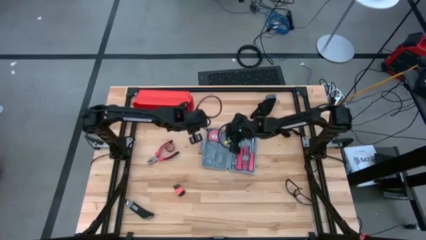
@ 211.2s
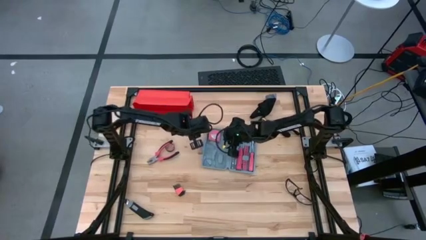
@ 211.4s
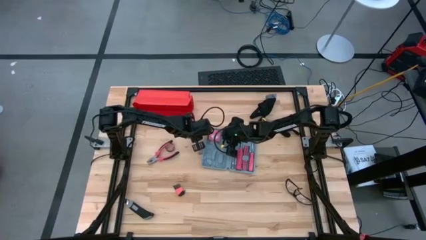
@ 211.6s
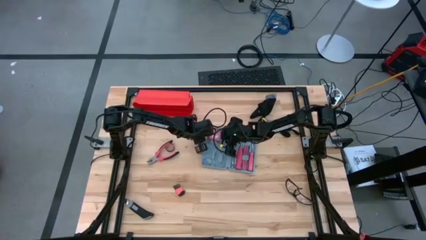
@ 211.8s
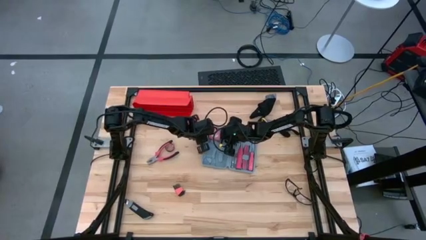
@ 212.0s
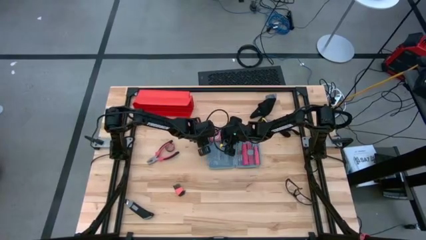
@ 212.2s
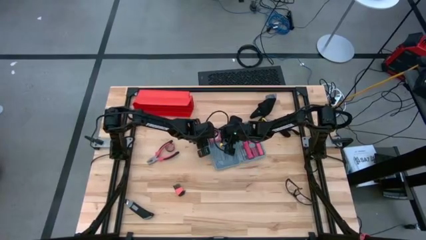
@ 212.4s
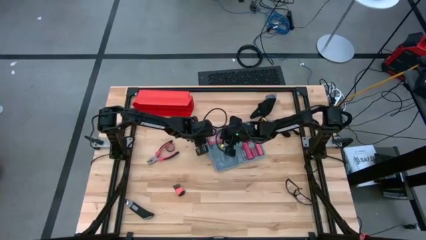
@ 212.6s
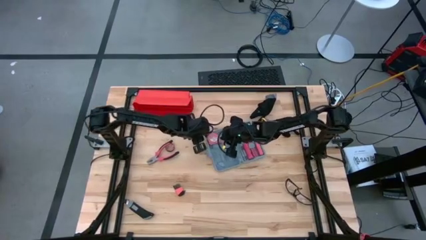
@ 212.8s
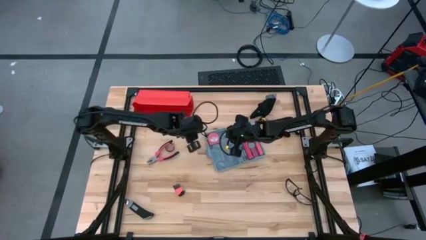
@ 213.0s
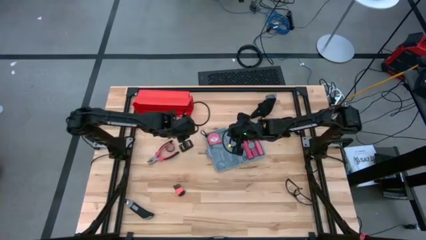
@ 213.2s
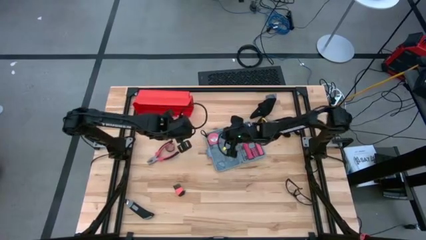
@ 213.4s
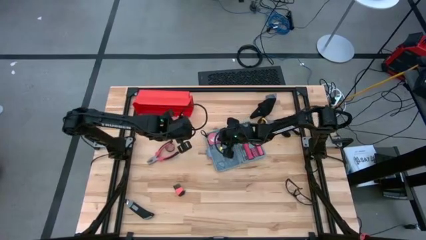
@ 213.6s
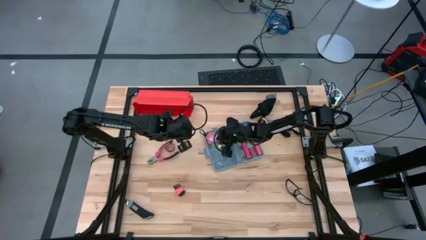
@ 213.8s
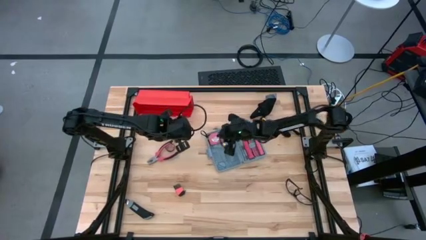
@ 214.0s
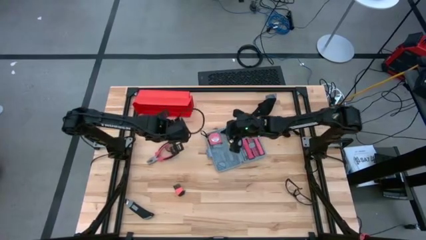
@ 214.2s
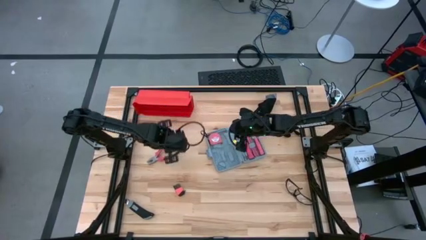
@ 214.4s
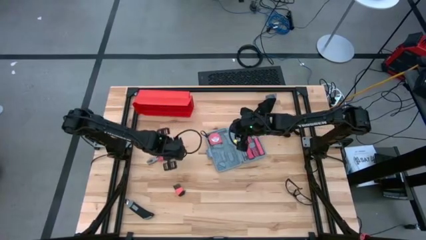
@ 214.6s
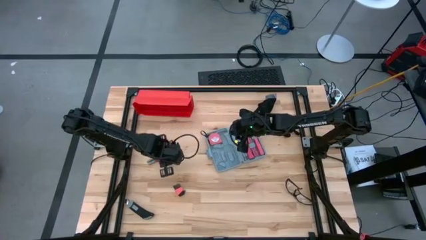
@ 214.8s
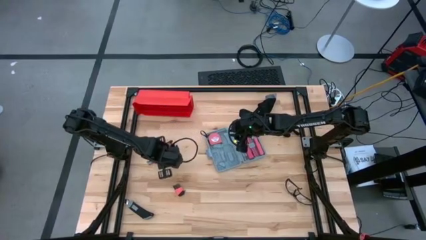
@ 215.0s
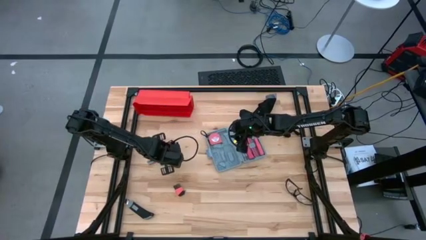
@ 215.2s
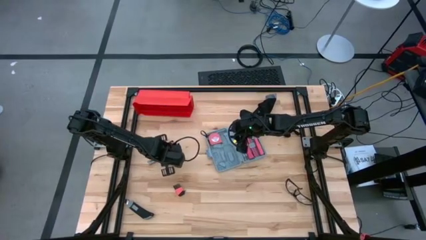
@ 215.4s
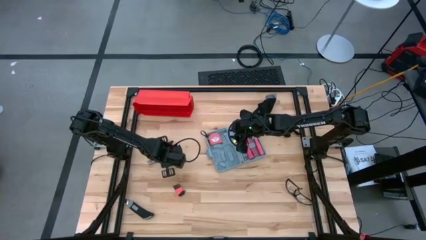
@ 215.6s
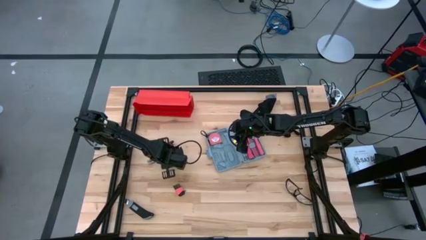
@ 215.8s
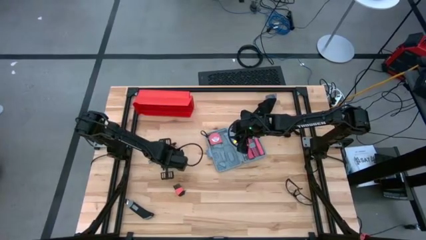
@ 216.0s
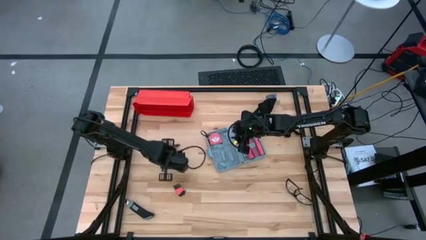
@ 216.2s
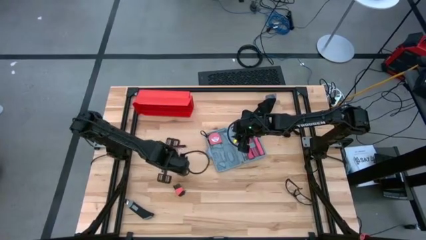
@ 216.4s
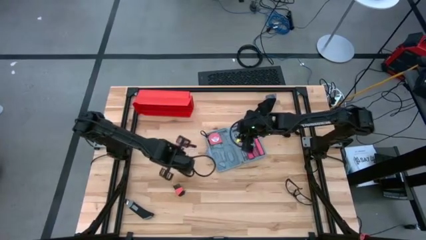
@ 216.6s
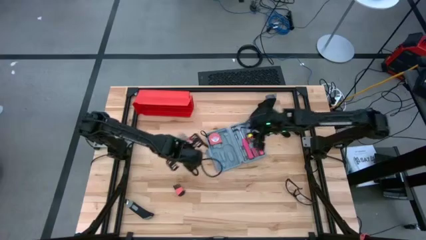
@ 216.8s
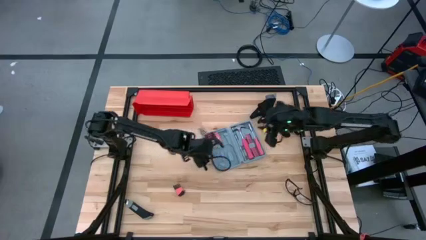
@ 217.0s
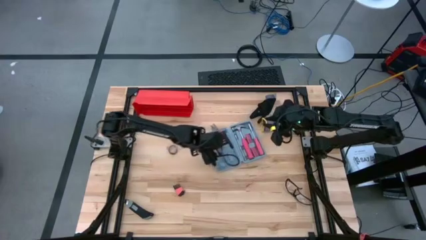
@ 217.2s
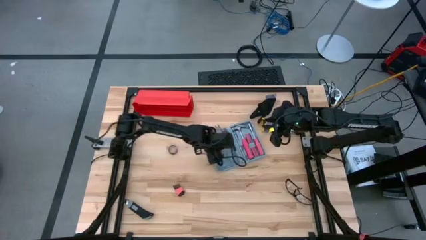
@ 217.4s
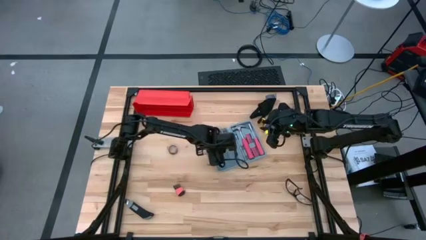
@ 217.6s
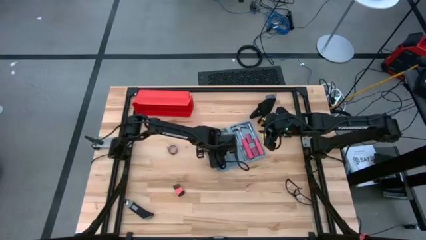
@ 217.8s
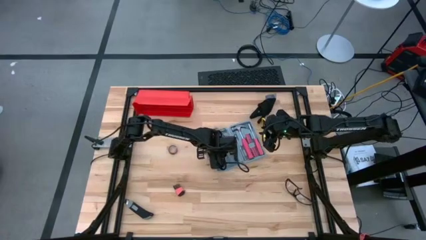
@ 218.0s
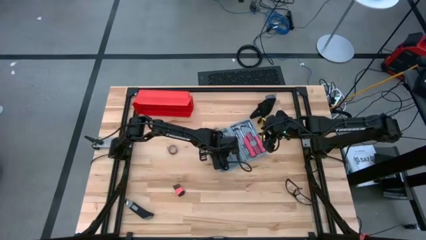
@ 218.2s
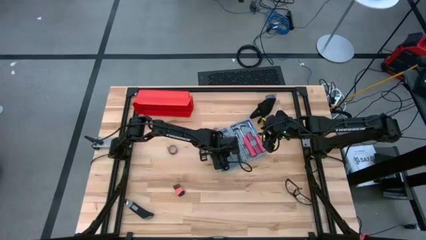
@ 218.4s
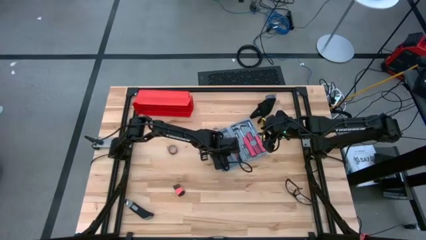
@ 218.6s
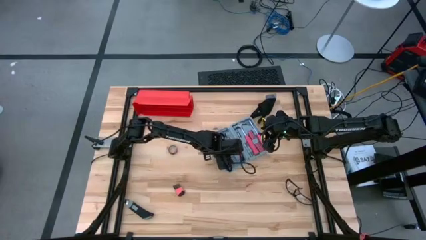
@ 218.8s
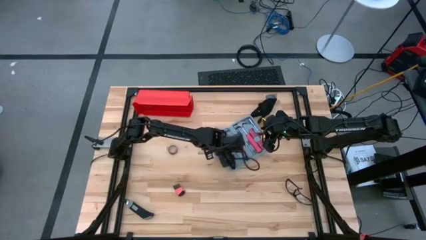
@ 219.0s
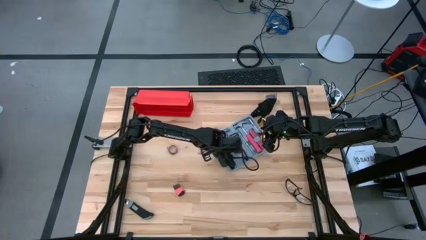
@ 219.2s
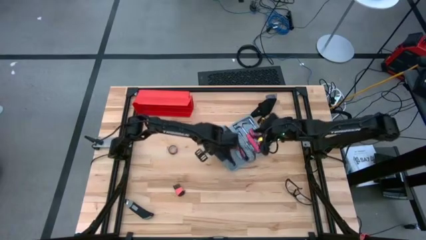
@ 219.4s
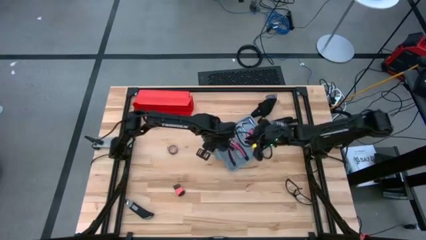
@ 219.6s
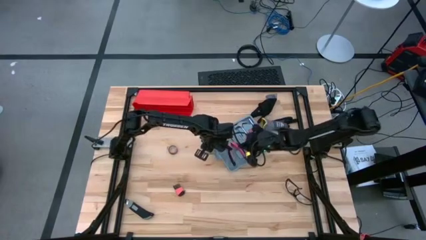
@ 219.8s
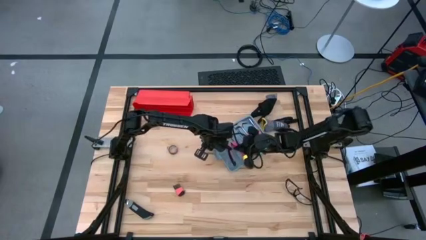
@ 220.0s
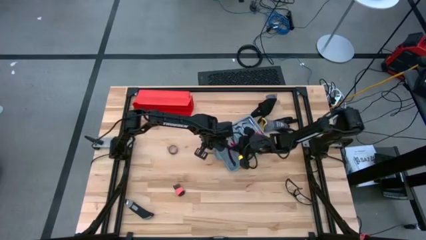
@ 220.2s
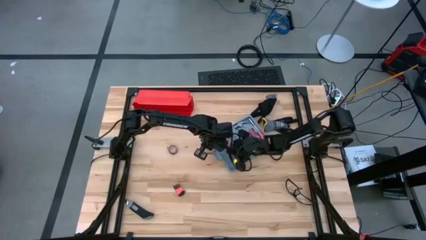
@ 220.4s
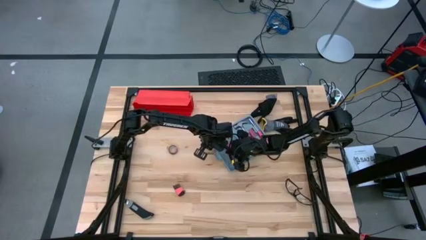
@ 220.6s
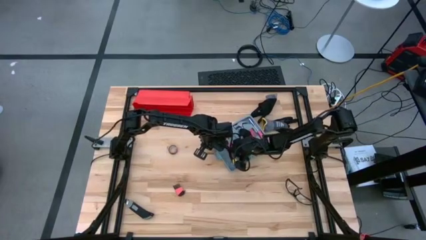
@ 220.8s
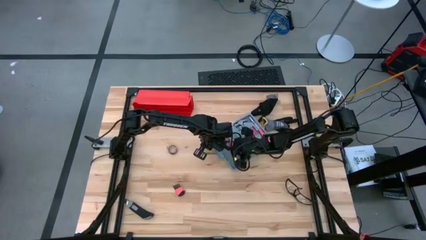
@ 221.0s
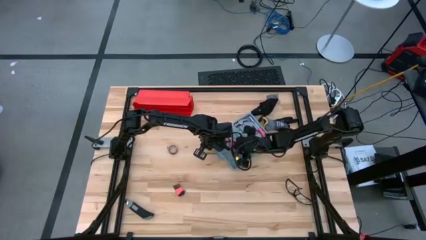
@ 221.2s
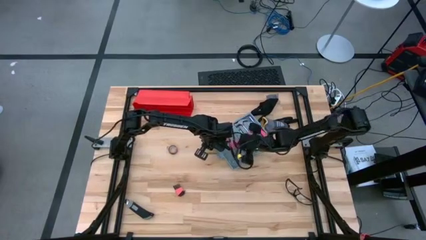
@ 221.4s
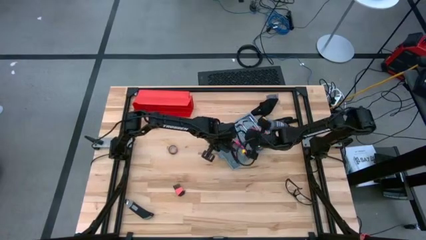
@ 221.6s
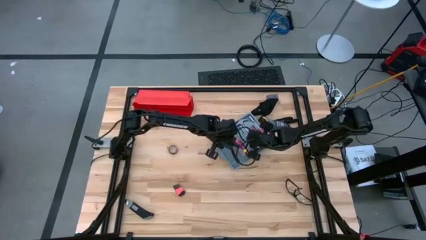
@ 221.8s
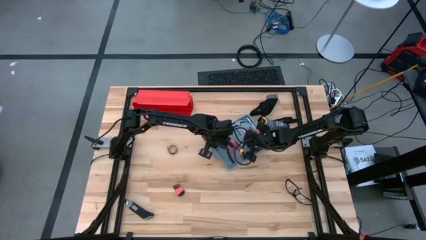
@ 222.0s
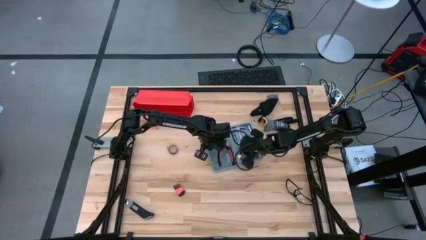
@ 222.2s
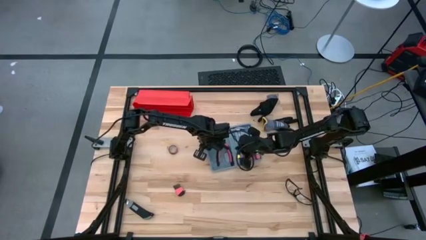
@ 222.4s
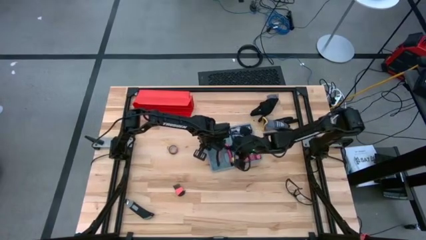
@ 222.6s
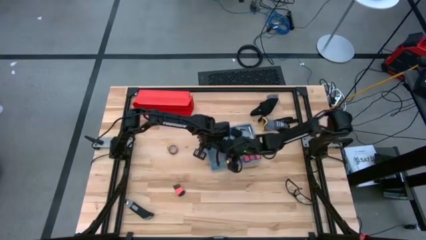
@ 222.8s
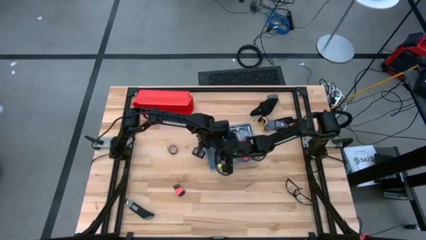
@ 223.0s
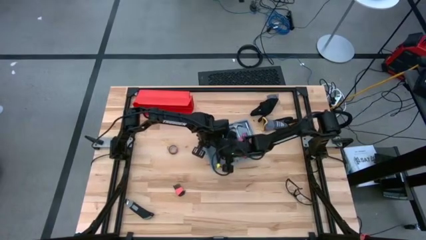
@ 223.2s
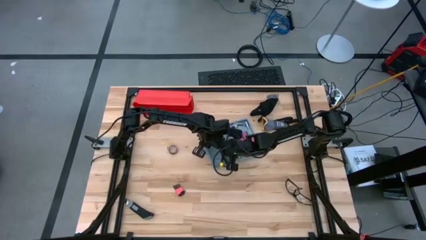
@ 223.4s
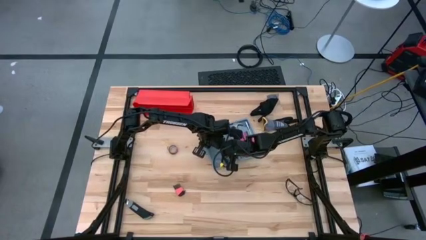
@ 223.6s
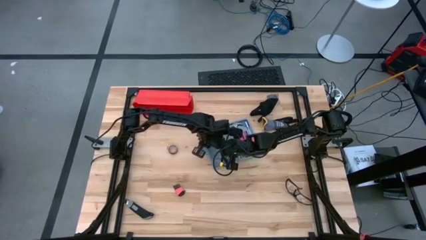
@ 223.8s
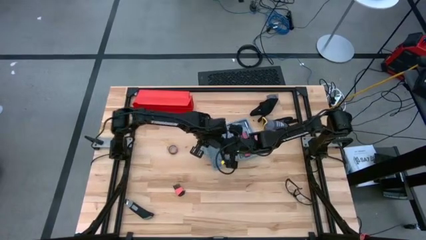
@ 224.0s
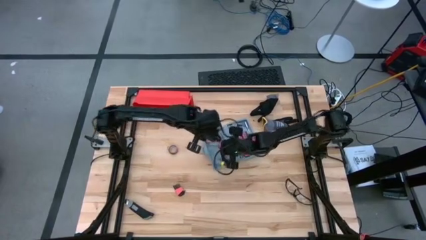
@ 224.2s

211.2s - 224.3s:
Task: prefit tool cases
Put the orange pliers into the gray pre-fit tool case

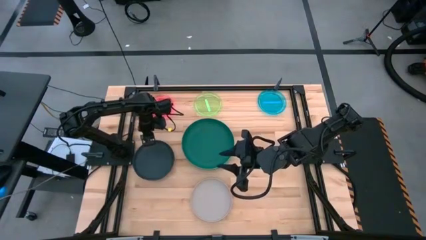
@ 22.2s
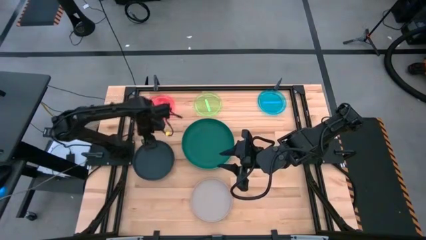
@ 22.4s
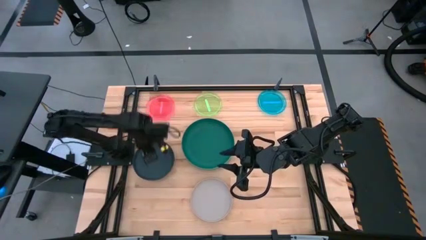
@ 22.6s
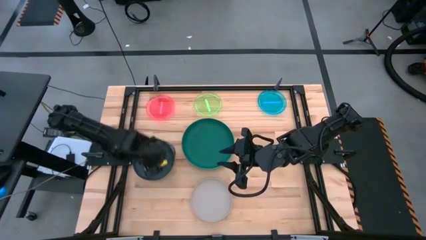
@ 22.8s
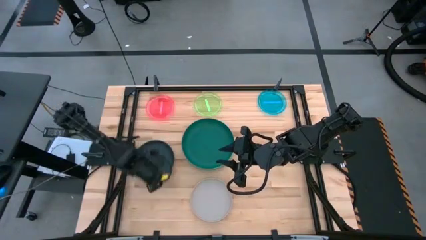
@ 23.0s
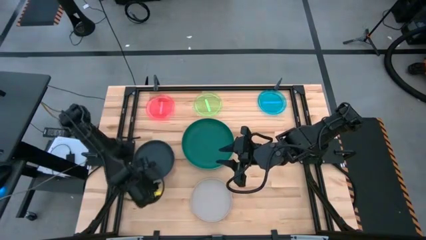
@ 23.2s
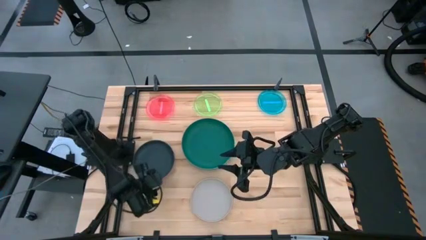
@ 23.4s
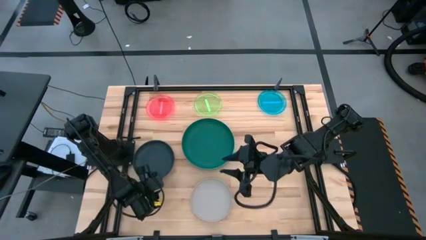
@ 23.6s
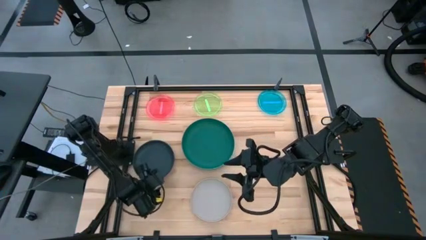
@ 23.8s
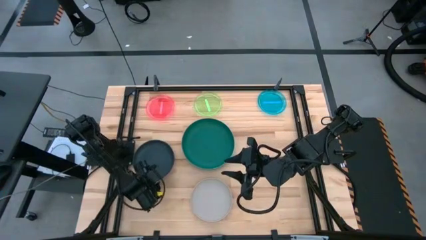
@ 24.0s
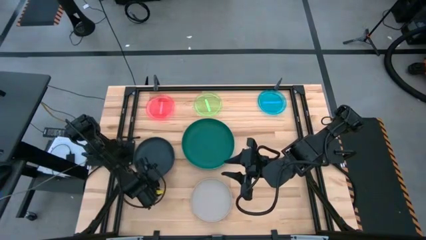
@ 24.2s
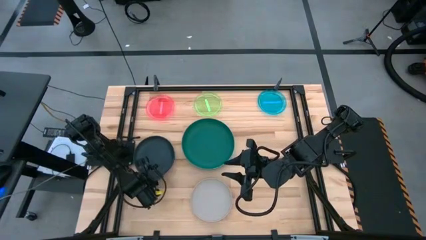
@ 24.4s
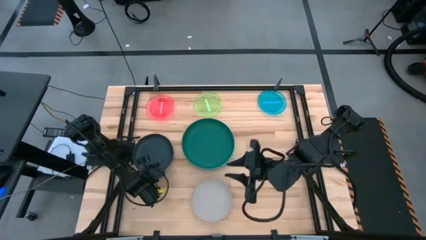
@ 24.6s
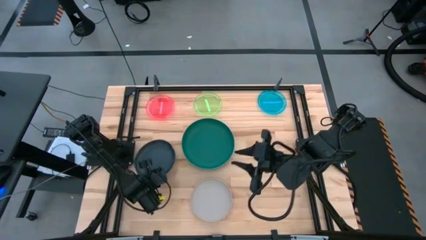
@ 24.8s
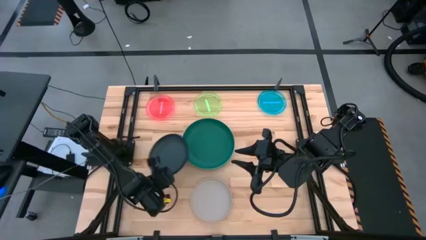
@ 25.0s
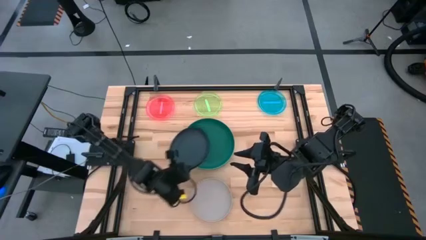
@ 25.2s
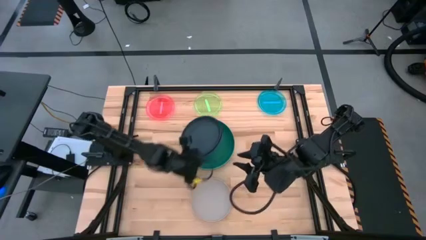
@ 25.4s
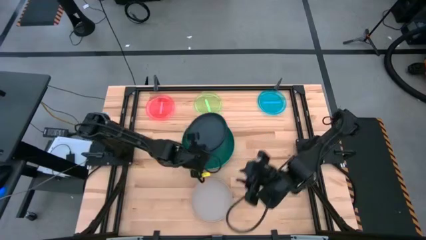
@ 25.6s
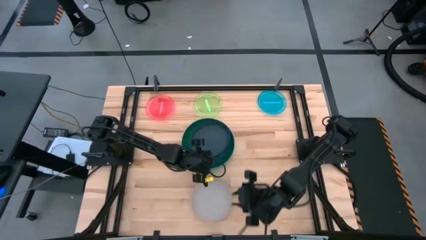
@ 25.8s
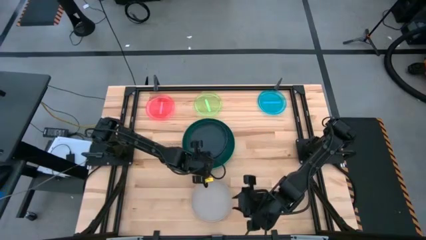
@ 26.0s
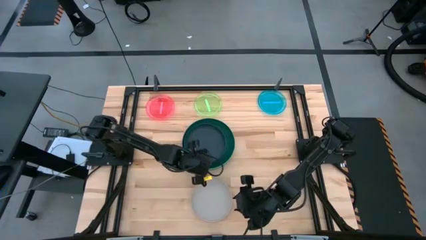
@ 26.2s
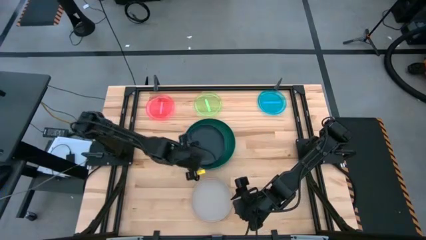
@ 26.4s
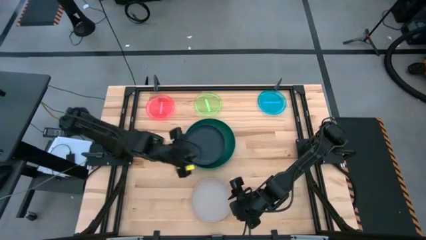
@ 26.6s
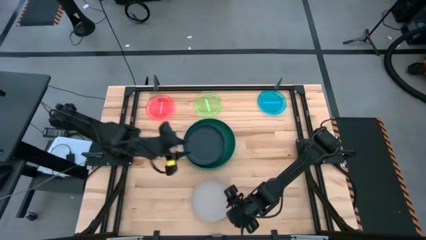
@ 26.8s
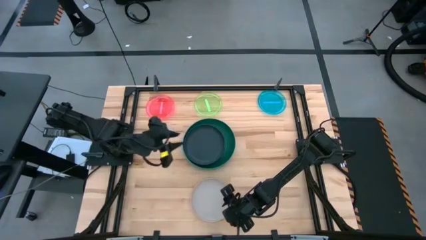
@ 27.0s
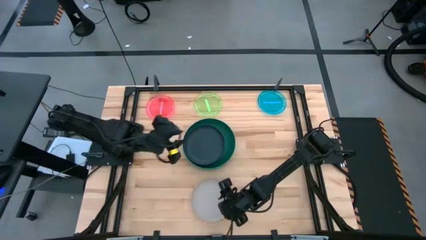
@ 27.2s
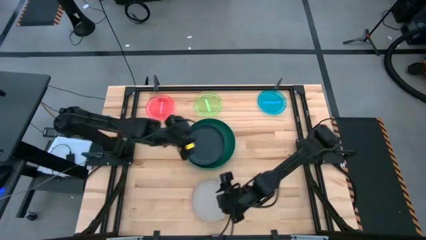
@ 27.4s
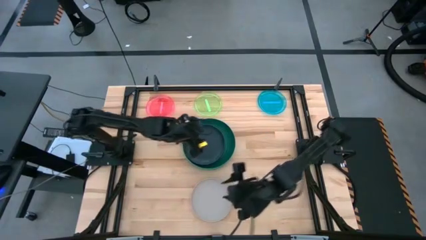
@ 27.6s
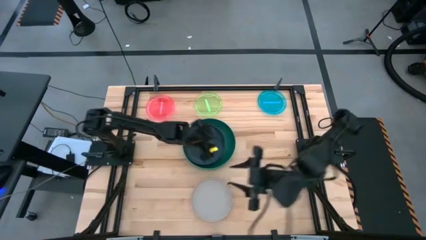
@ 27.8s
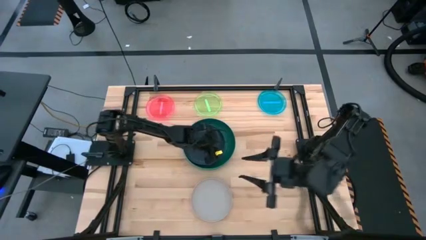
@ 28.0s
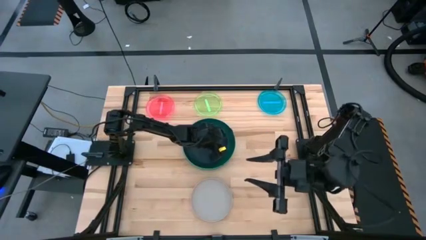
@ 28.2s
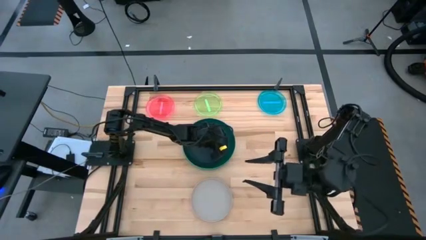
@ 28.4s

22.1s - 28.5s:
Task: Stack plastic plates
Stack the stacked plates on the green plate
